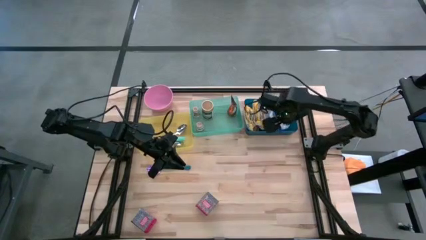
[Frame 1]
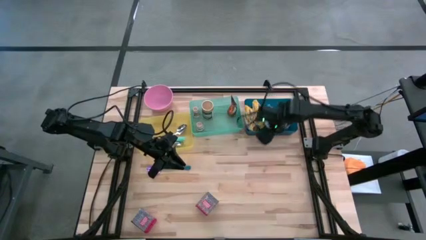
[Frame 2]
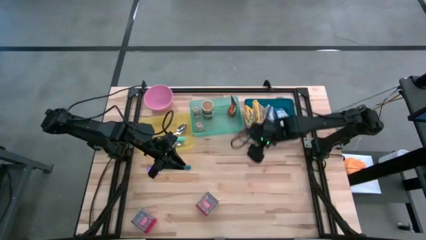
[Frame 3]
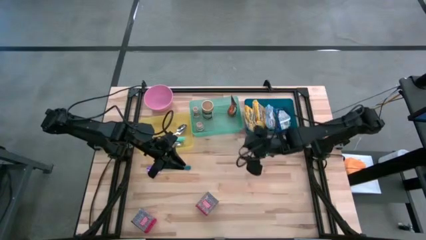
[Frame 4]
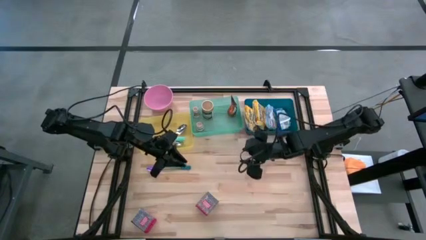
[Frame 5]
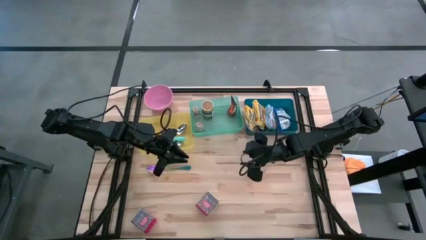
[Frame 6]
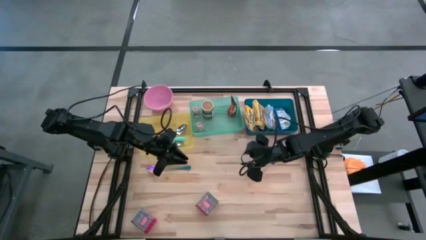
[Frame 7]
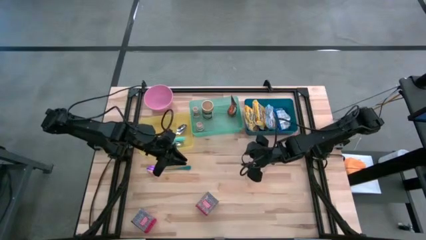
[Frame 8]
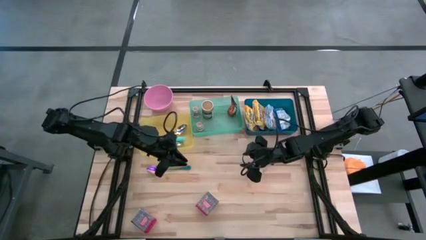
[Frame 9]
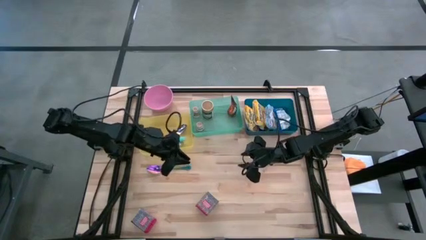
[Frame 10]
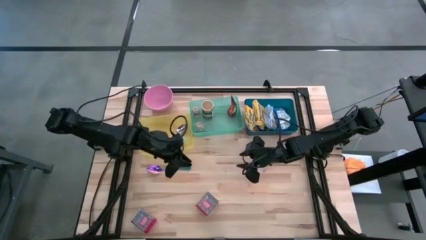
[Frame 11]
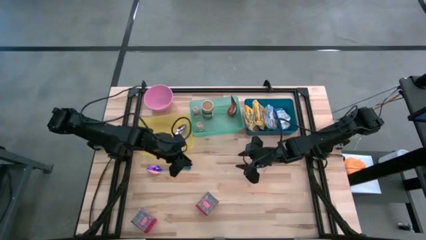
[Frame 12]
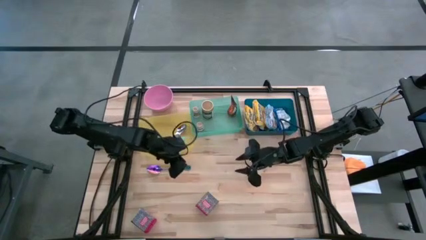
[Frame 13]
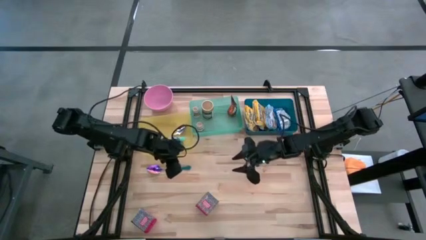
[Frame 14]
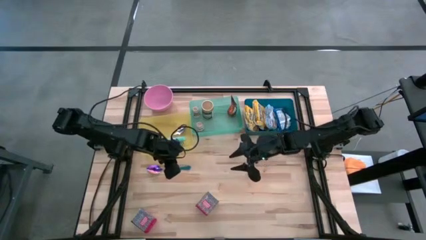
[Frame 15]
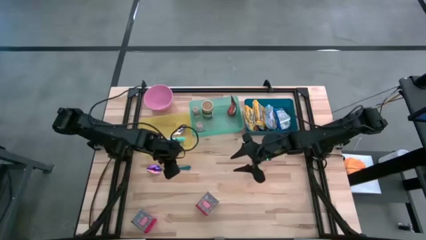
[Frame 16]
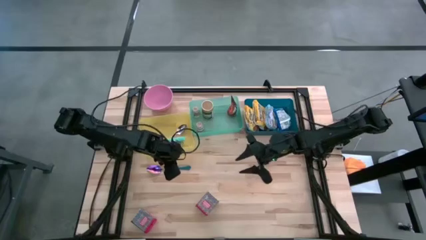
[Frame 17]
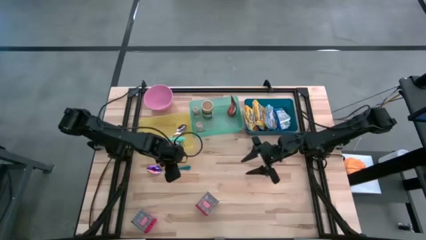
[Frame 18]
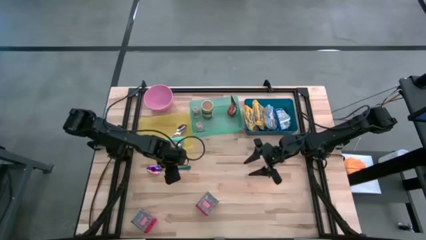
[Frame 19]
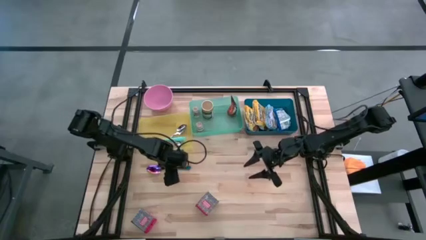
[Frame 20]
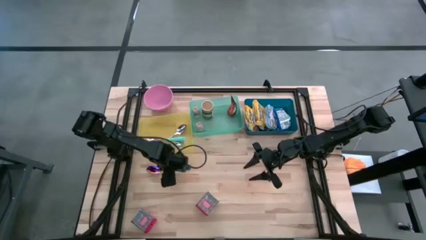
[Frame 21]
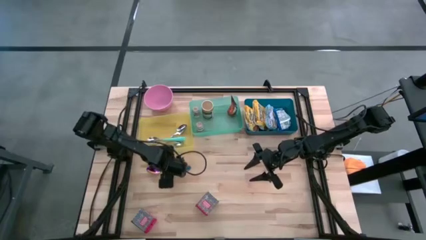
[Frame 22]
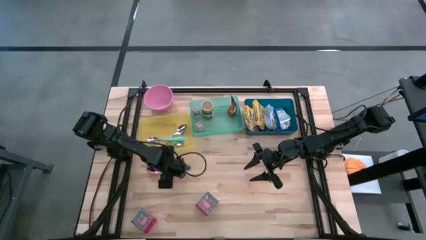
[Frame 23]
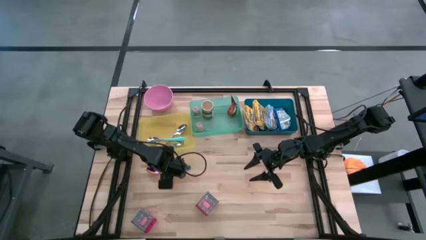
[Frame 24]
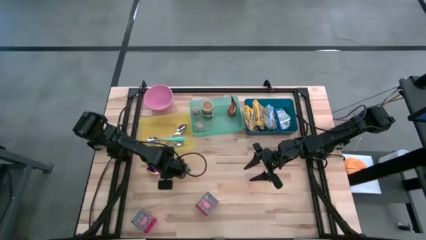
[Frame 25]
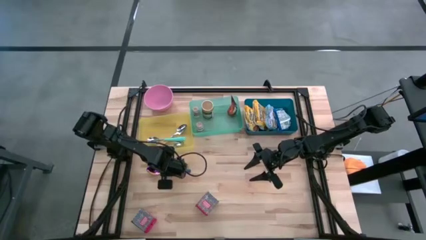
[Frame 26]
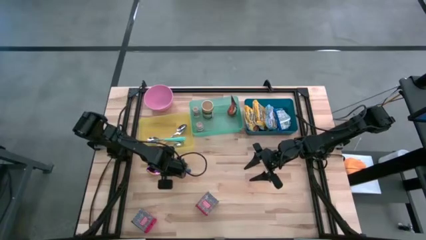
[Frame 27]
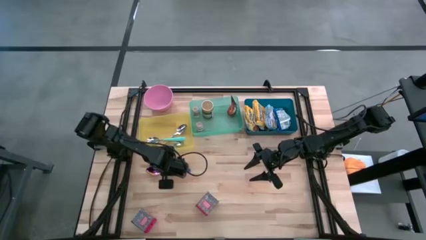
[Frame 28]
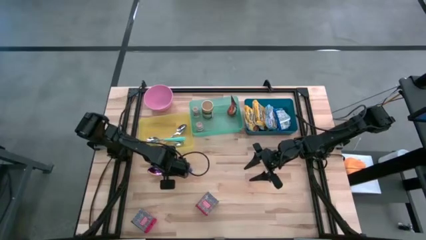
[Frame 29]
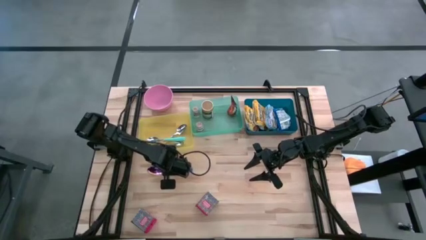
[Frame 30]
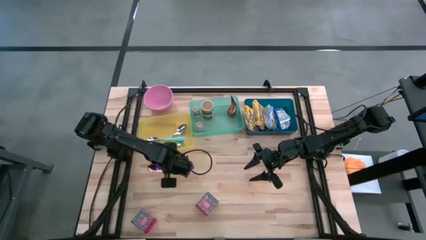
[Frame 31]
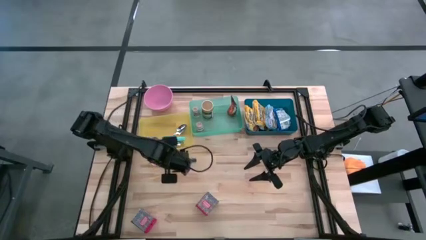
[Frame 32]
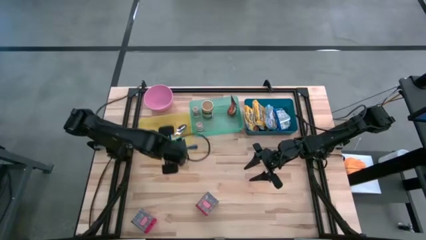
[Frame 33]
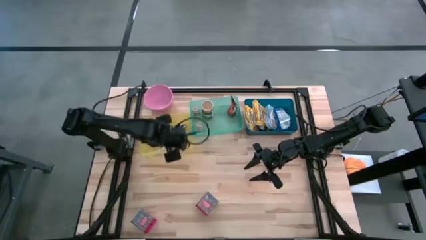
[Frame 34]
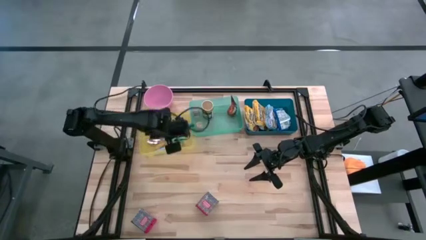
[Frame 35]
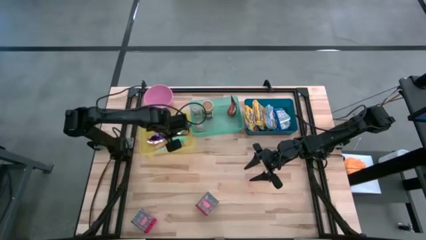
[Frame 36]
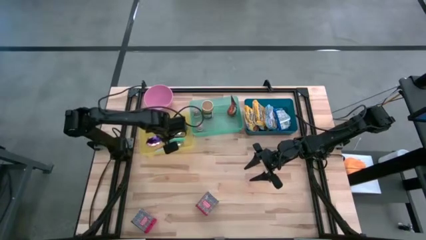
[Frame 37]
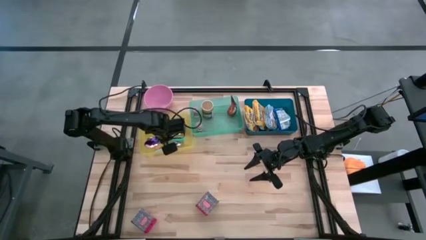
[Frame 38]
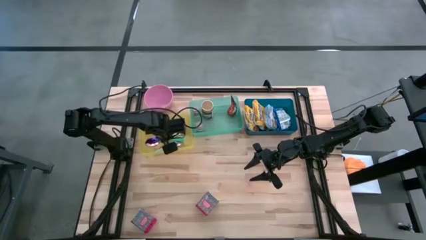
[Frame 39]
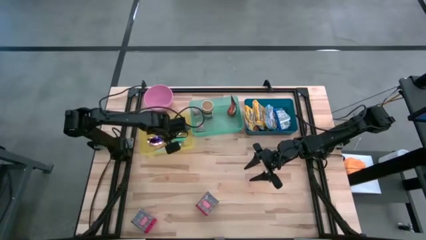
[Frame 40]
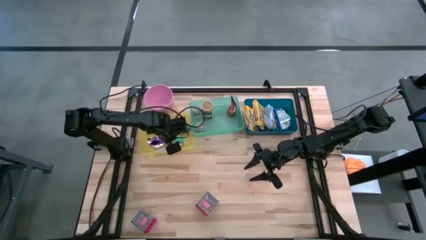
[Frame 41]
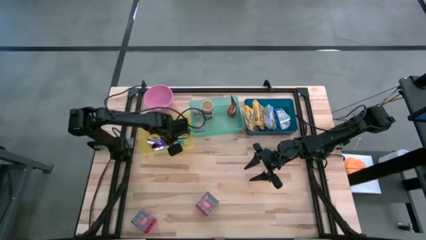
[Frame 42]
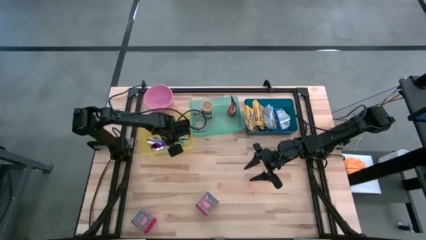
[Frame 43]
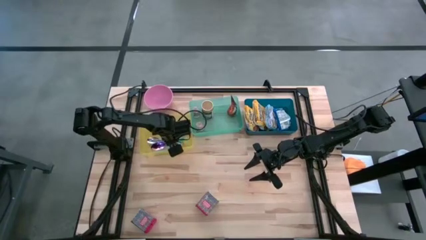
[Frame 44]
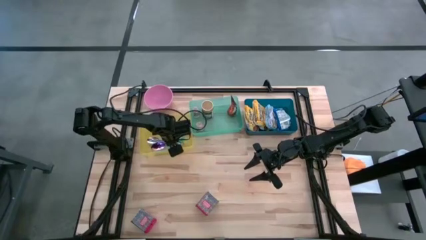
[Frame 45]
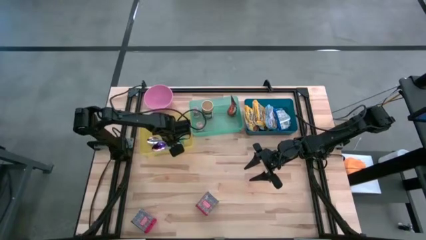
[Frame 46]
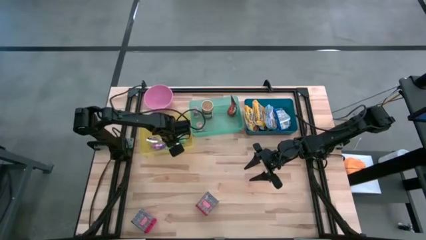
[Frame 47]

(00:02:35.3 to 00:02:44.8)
Put the purple spoon into the yellow bin
